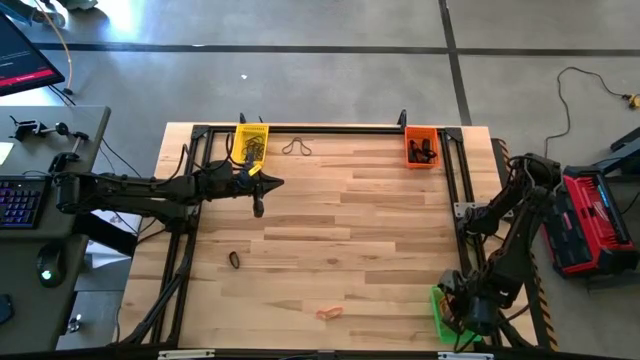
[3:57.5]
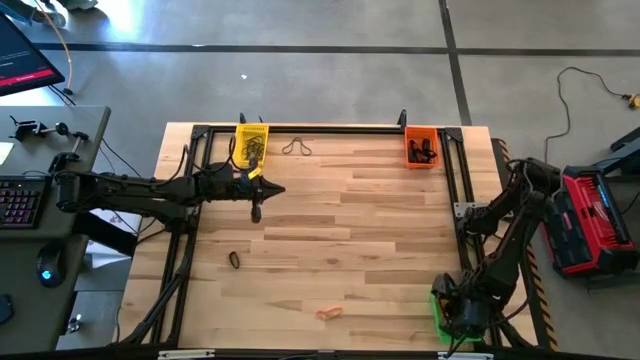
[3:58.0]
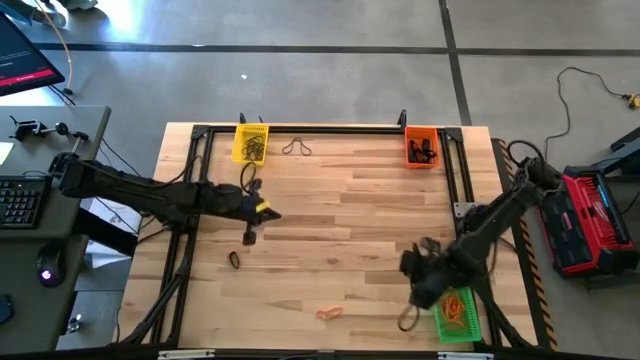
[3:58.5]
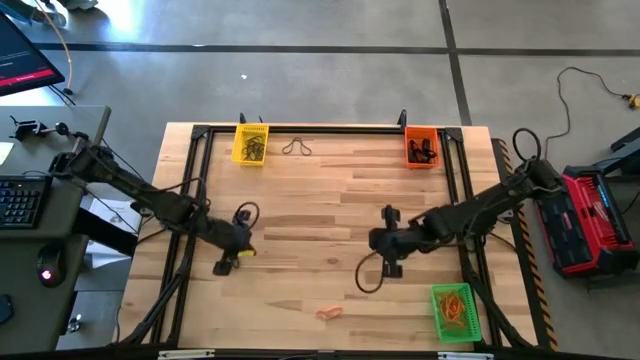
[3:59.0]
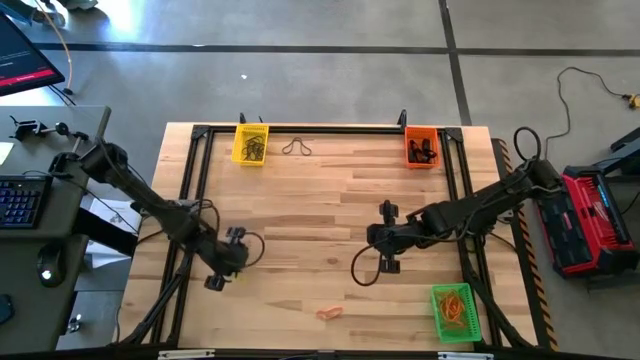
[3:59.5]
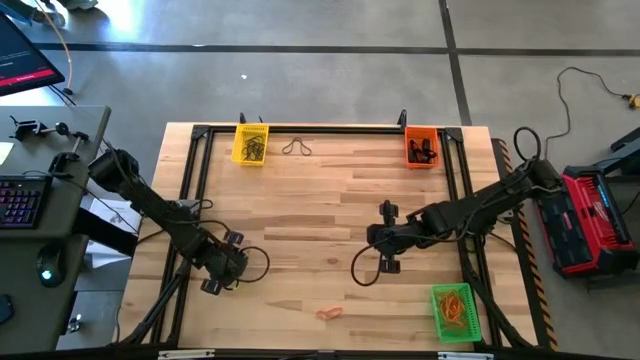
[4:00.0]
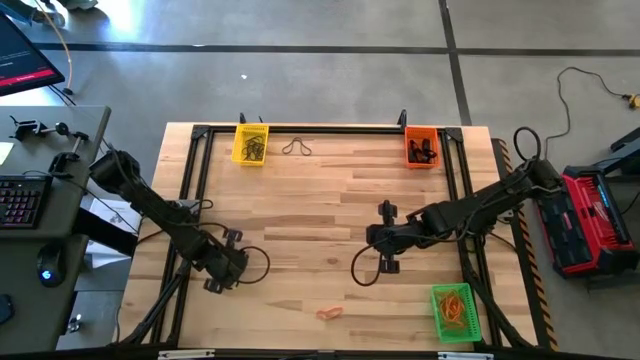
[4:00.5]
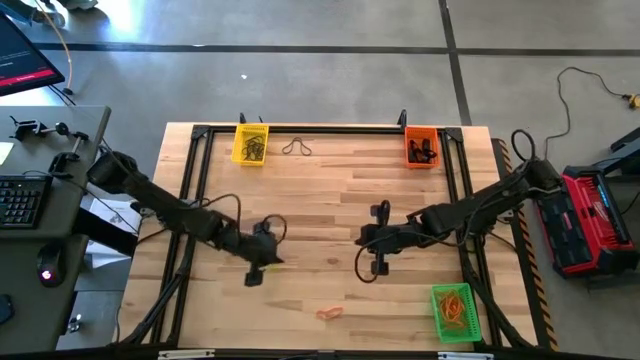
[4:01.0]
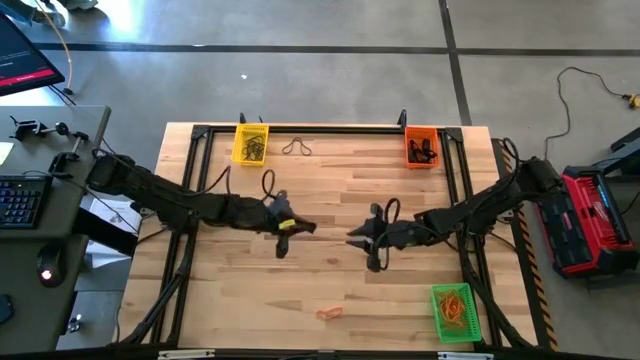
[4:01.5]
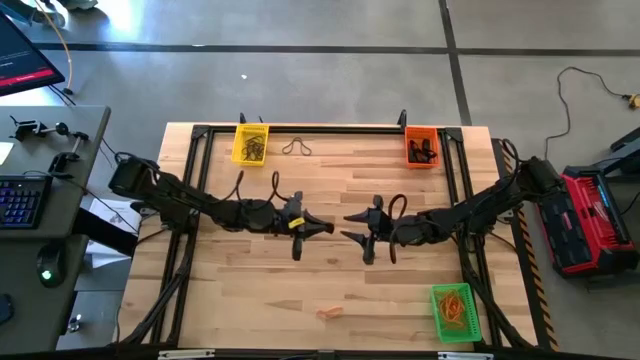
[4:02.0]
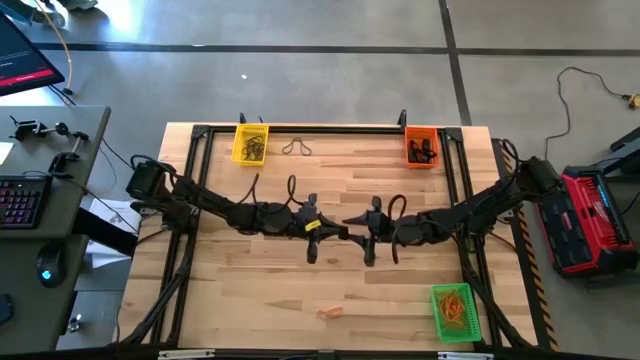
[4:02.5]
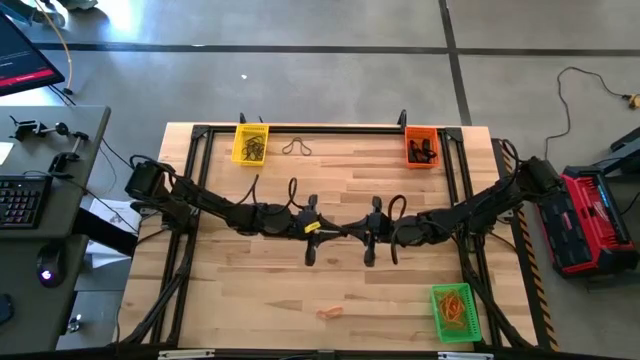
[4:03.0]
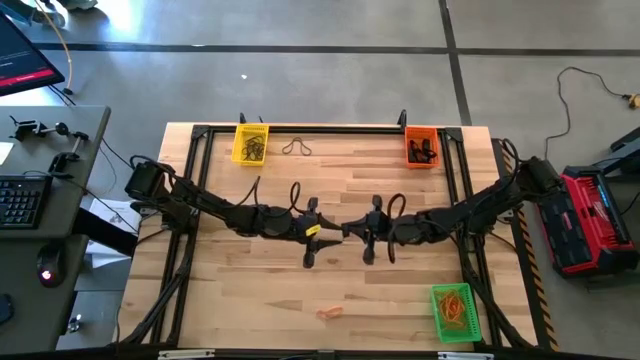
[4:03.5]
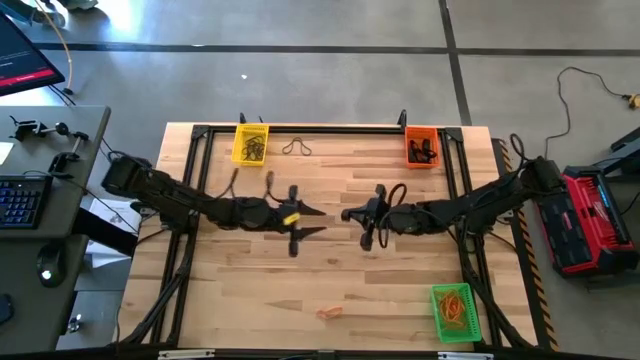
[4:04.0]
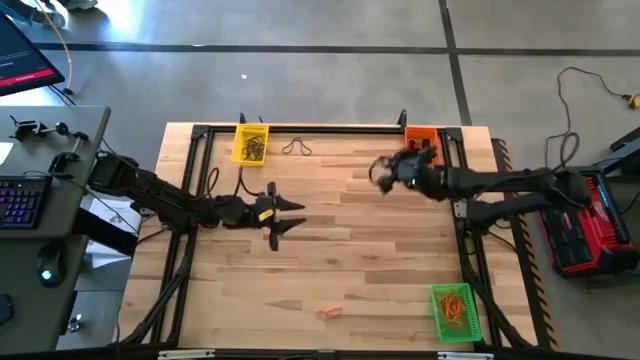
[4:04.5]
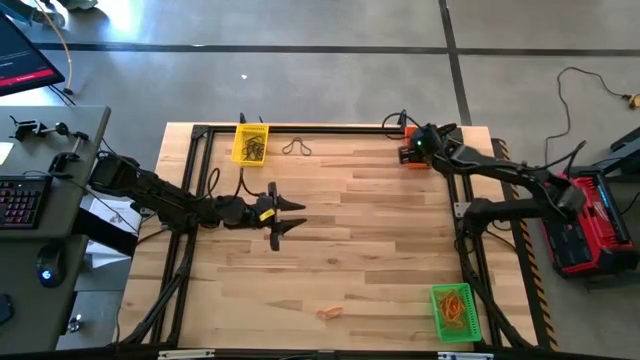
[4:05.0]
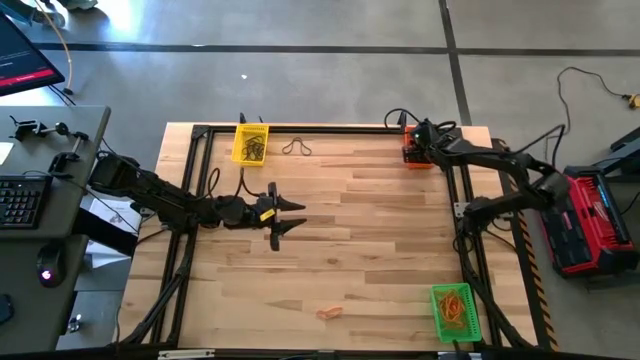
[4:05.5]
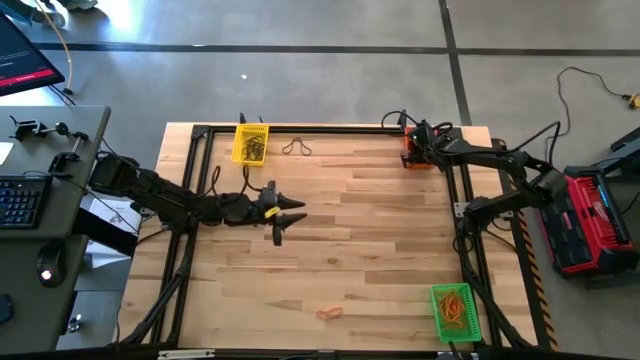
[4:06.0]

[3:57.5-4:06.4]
Task: Sort rubber bands into baskets
Put the black rubber band into the orange bin

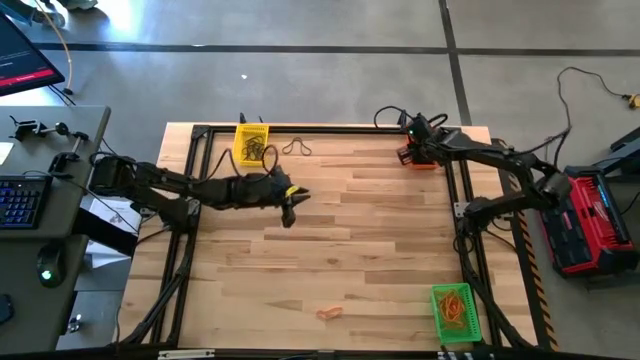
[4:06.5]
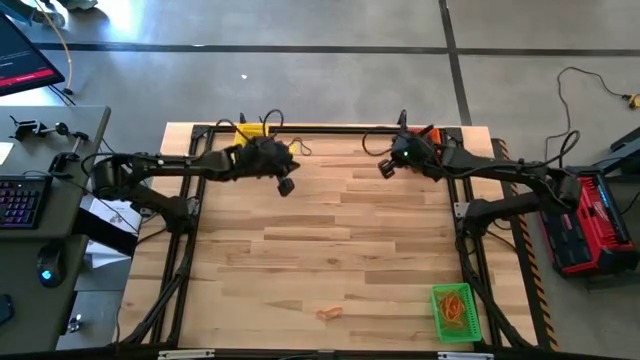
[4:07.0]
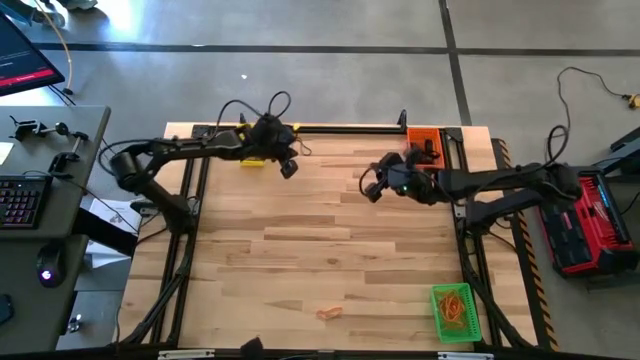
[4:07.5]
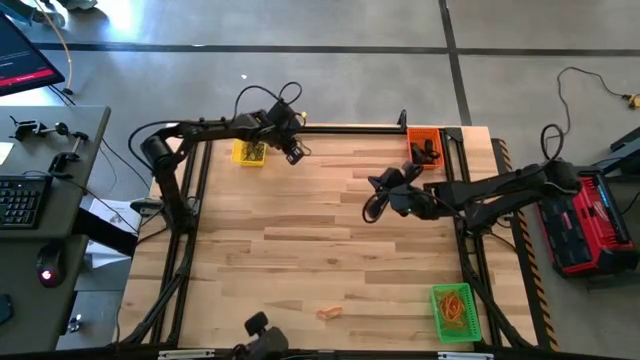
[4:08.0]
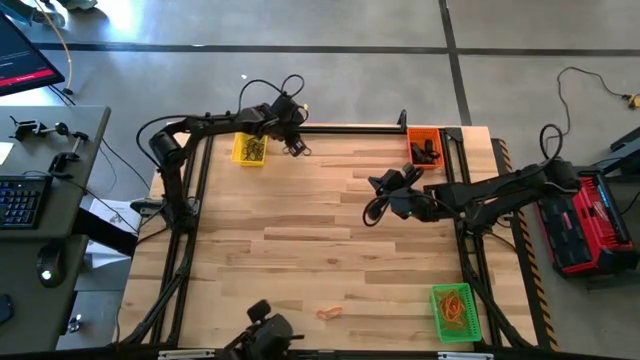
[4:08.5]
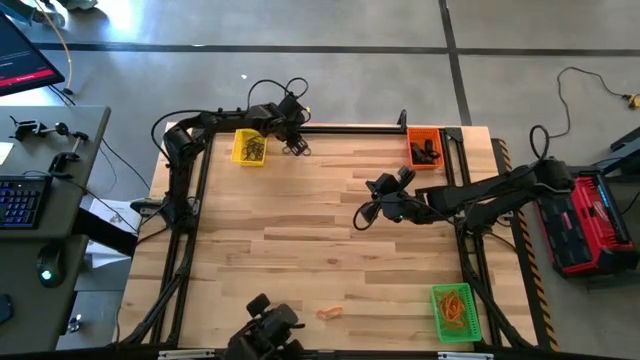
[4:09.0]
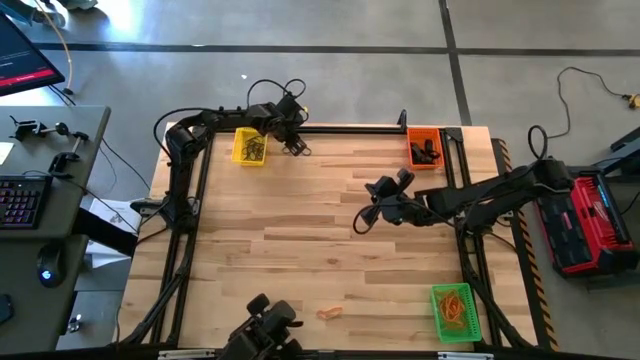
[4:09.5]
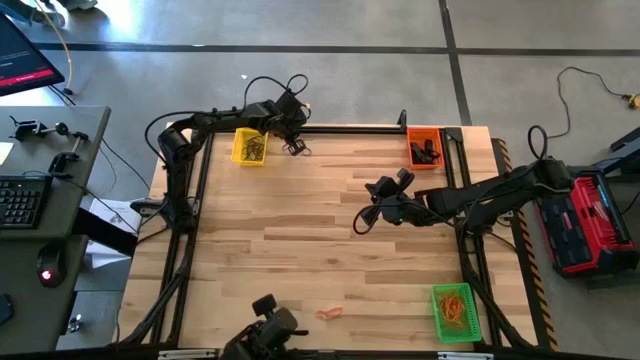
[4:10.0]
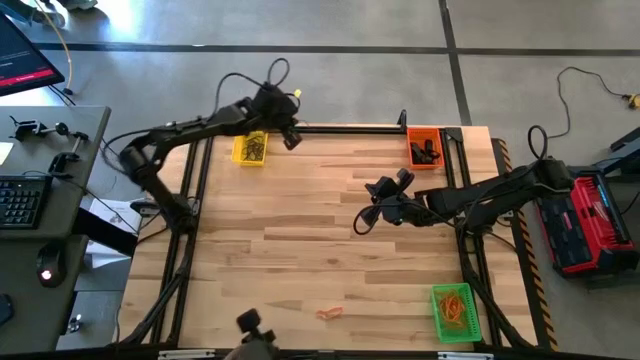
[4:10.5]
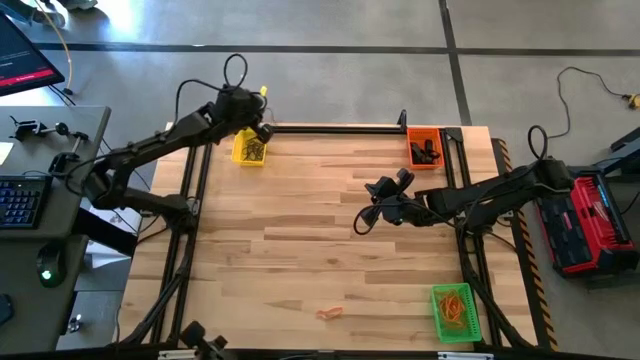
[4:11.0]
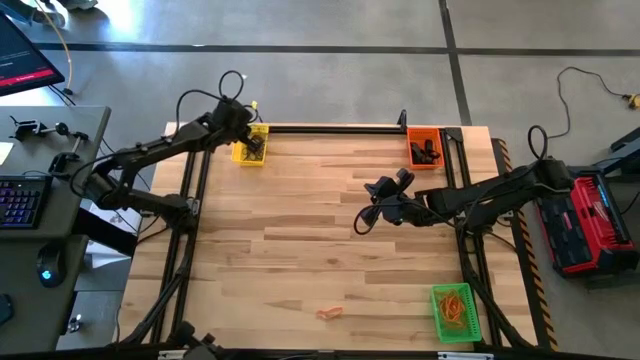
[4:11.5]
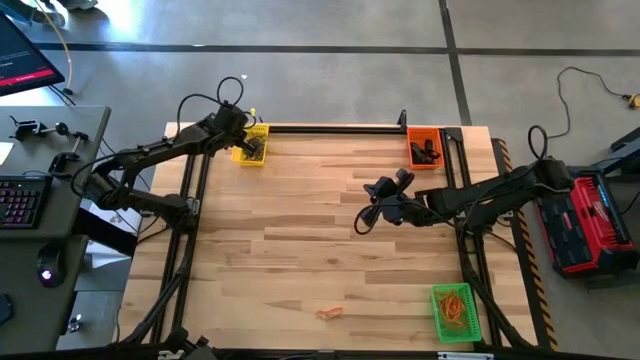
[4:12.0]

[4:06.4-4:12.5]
Put the purple rubber band into the yellow bin

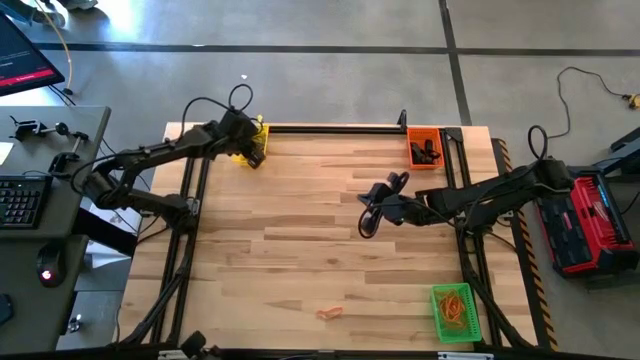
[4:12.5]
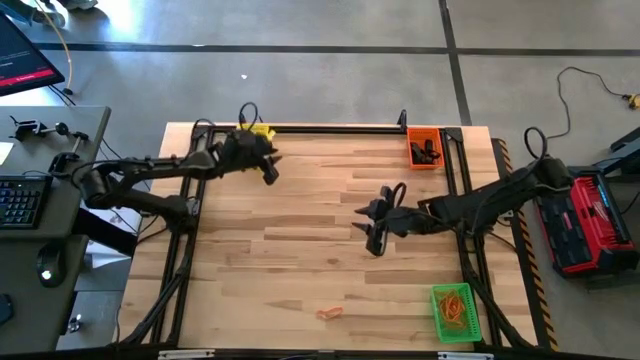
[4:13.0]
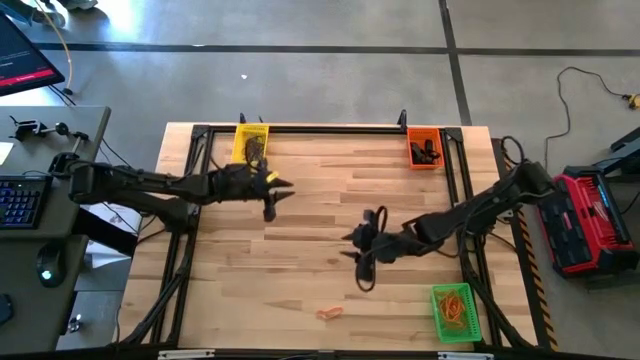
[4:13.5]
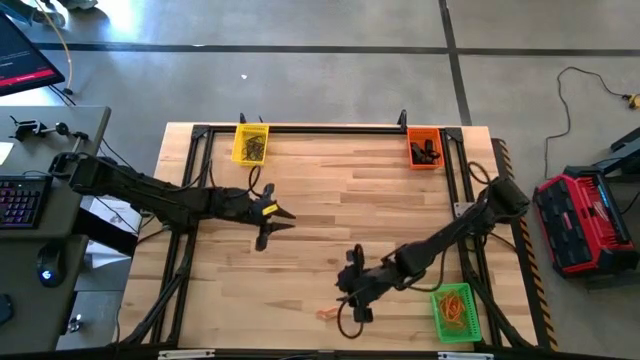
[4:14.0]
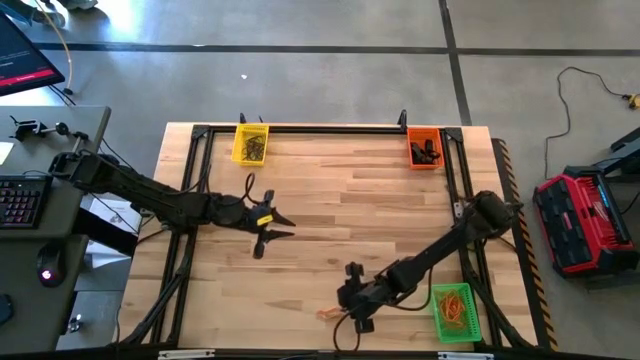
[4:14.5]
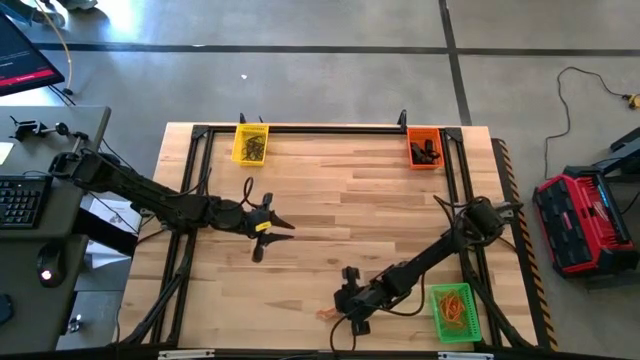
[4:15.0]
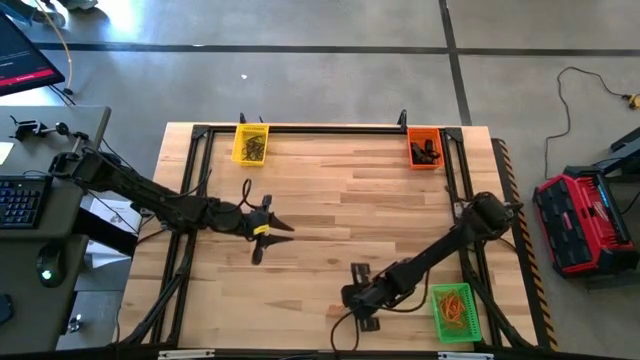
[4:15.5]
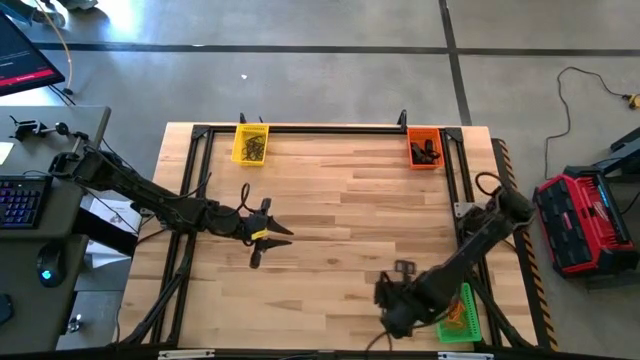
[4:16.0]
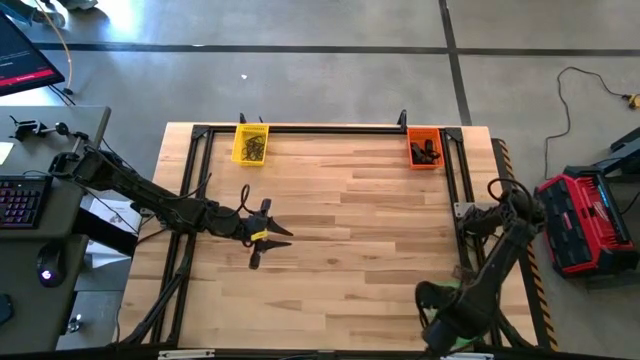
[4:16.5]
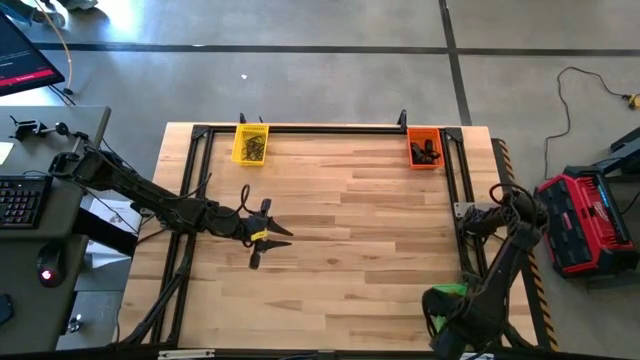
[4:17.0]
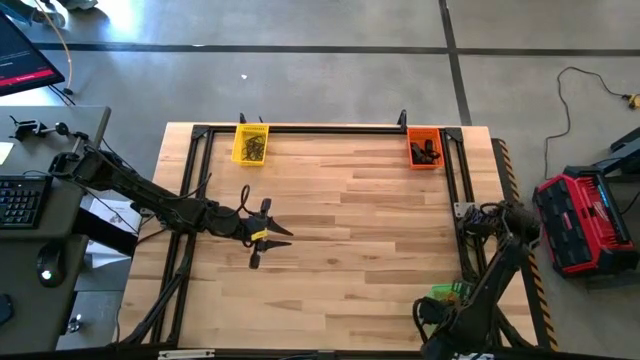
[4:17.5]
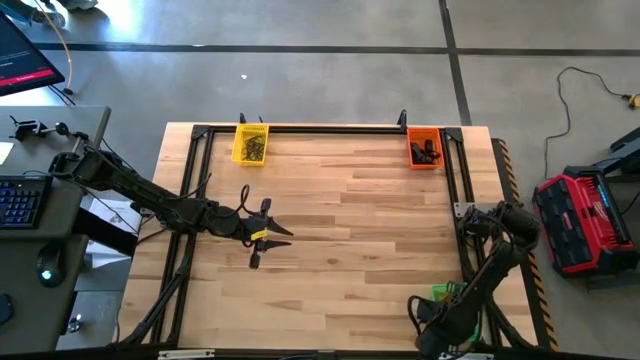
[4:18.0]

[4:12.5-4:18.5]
Put the orange rubber band into the green bin
